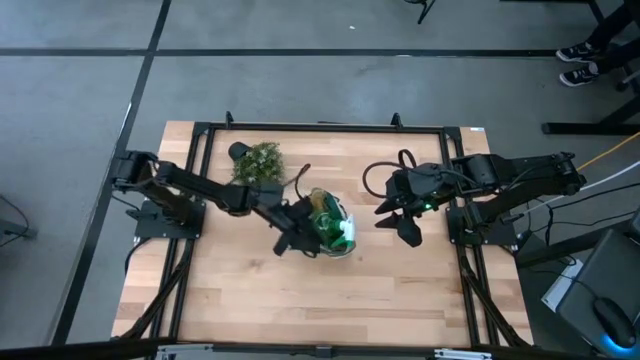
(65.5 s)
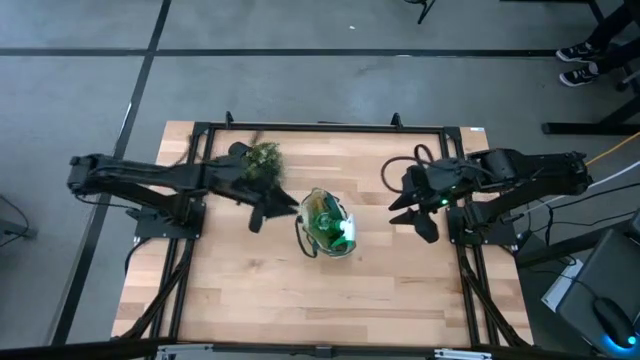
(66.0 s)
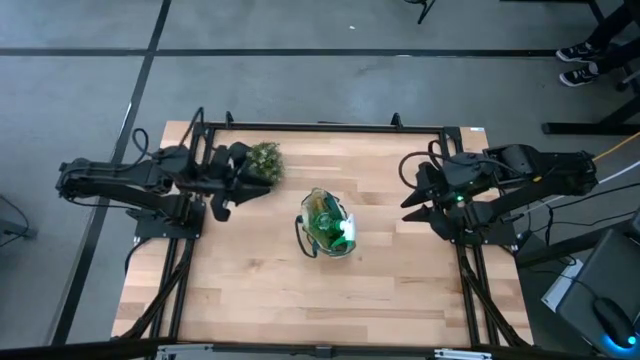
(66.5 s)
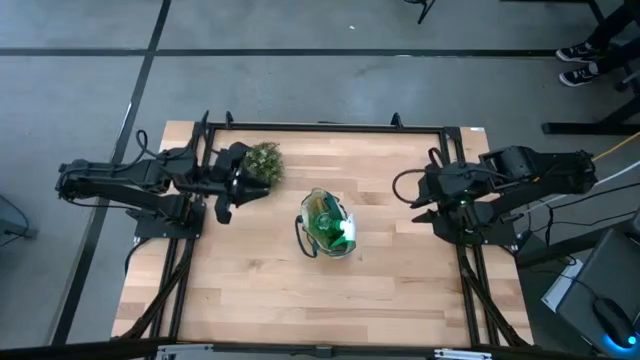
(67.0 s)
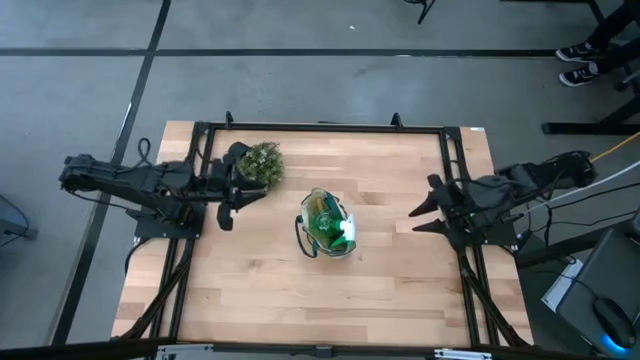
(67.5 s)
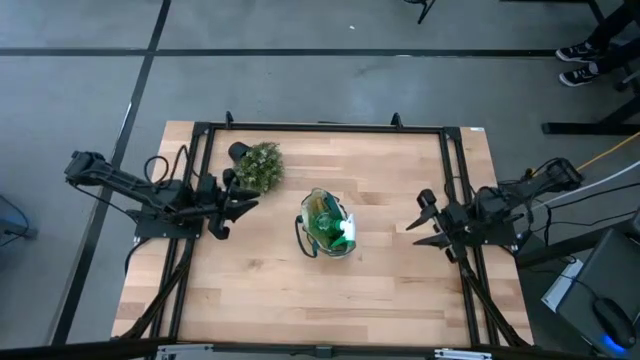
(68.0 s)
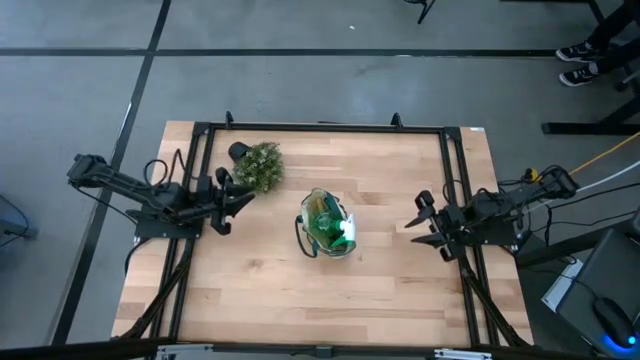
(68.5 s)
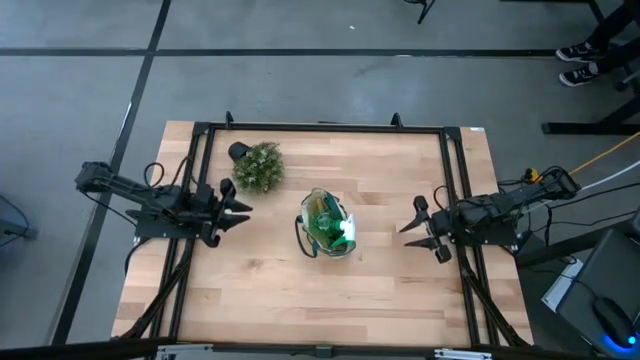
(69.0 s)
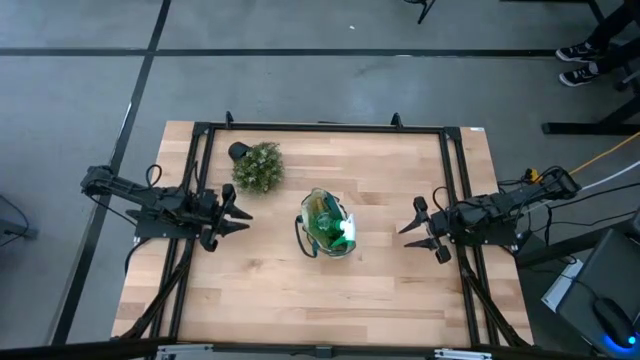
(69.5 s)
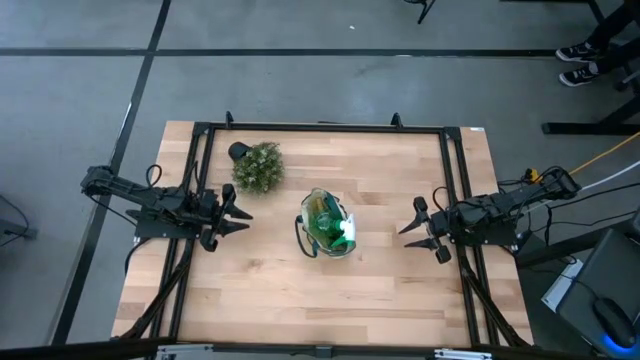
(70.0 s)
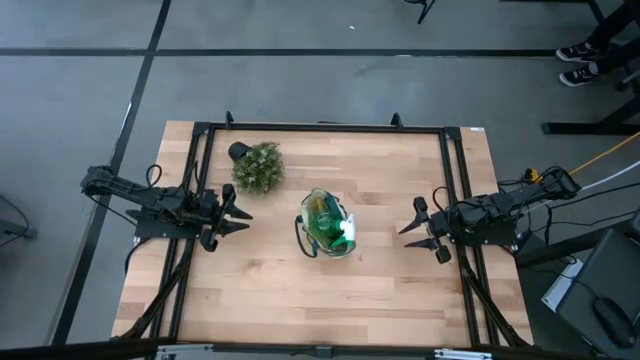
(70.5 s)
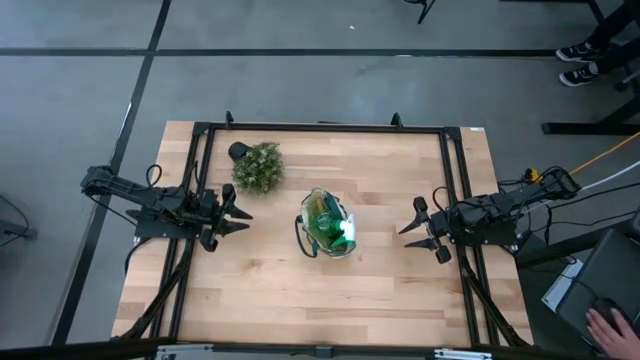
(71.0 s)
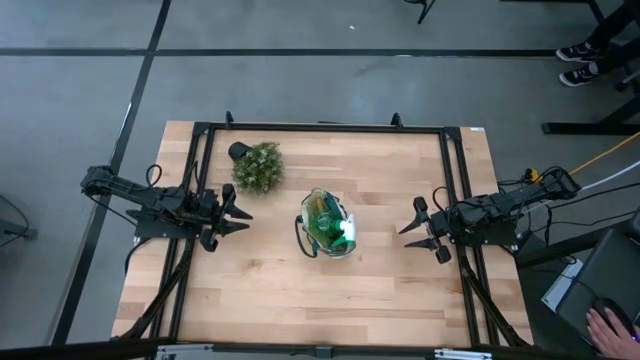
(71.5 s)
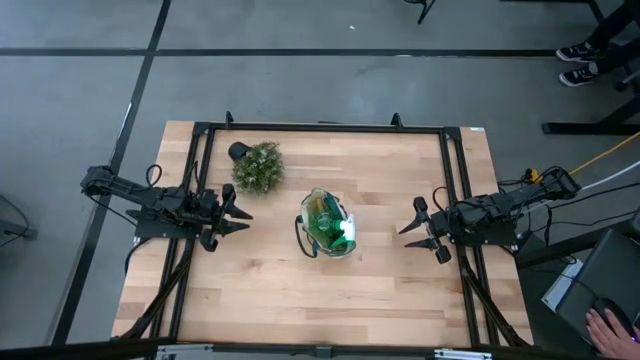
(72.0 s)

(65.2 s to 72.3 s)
Task: Pick & Place Garden tools in Gardening bag
Return to Home Position

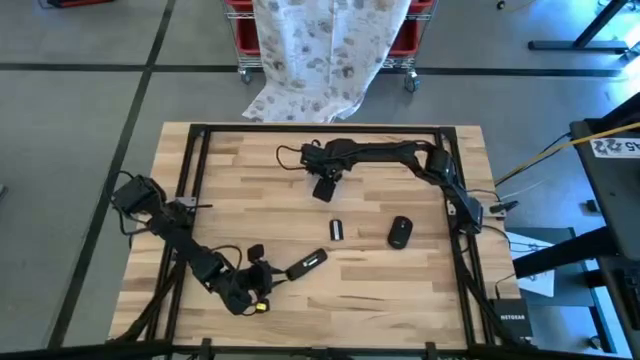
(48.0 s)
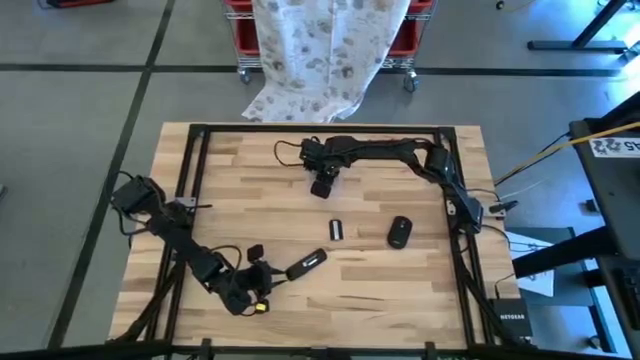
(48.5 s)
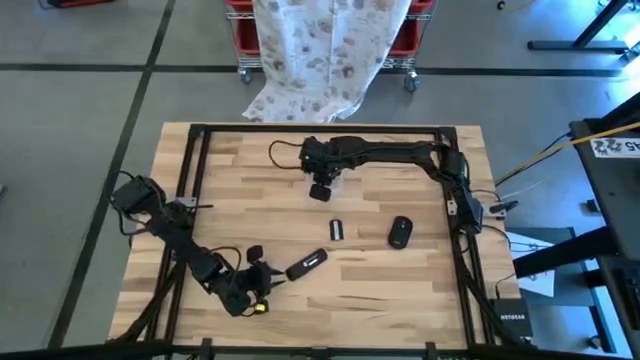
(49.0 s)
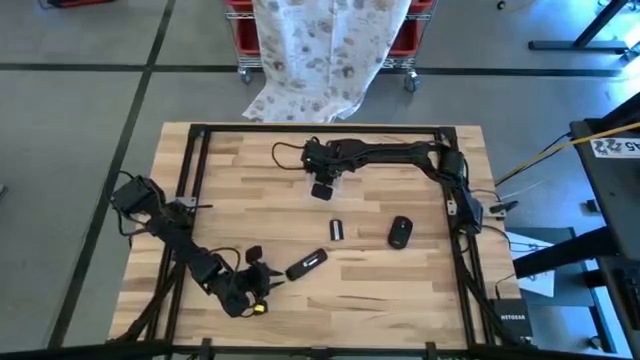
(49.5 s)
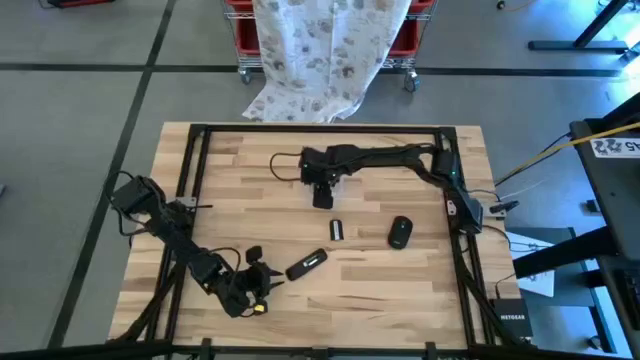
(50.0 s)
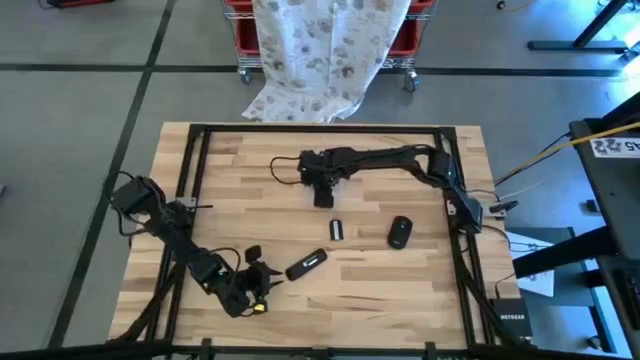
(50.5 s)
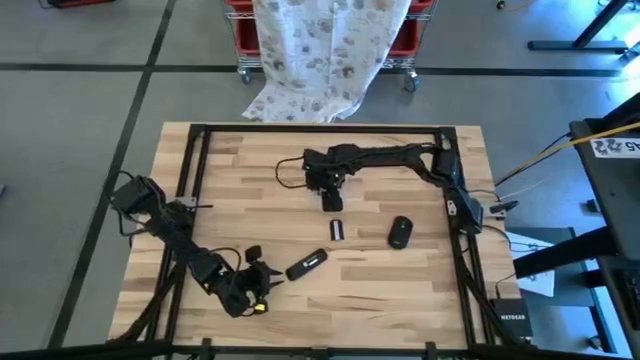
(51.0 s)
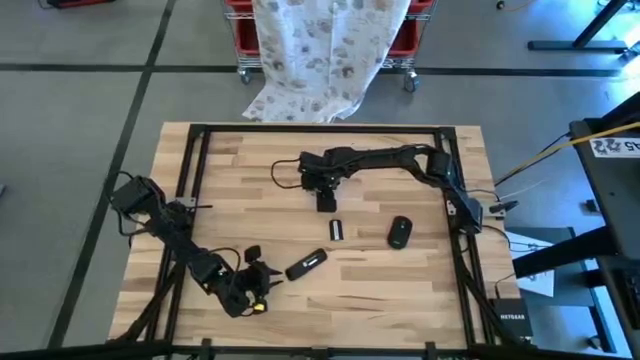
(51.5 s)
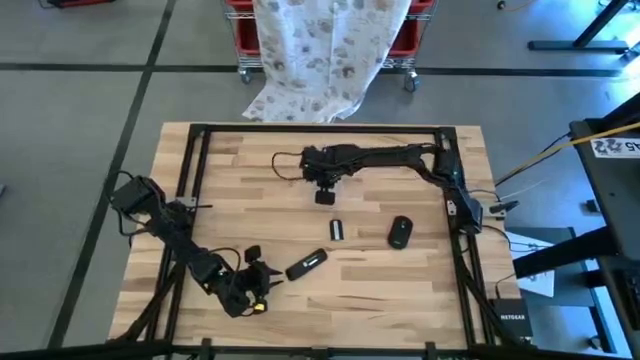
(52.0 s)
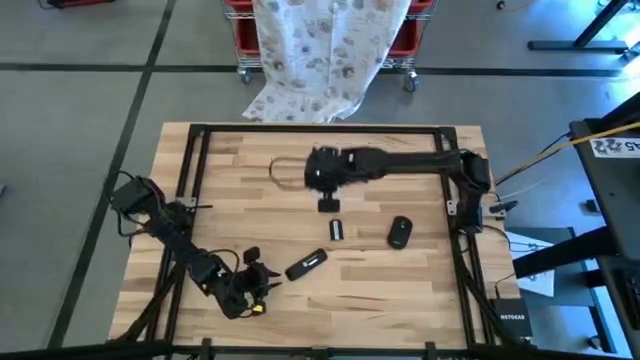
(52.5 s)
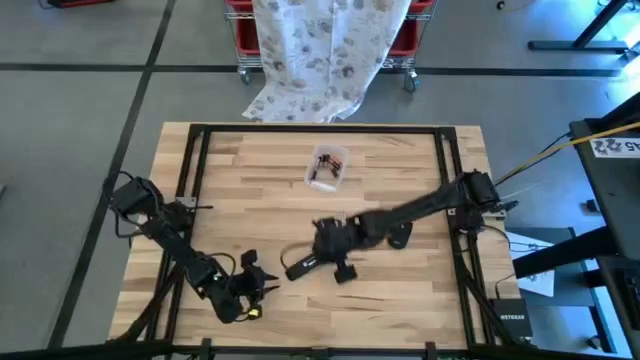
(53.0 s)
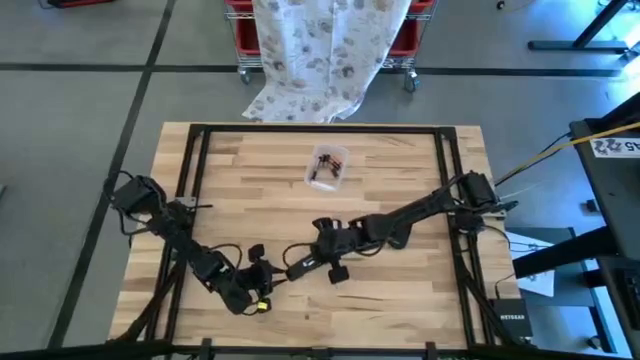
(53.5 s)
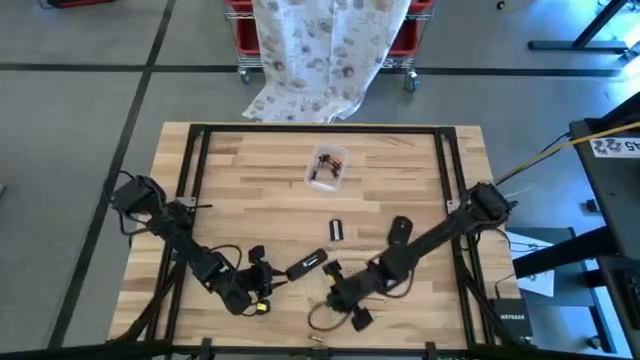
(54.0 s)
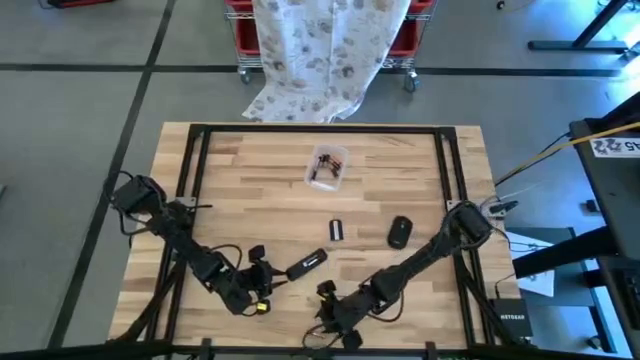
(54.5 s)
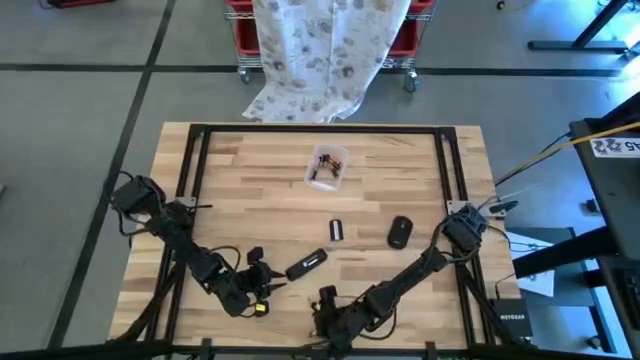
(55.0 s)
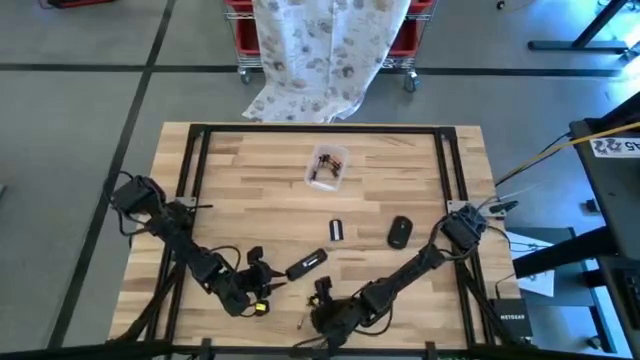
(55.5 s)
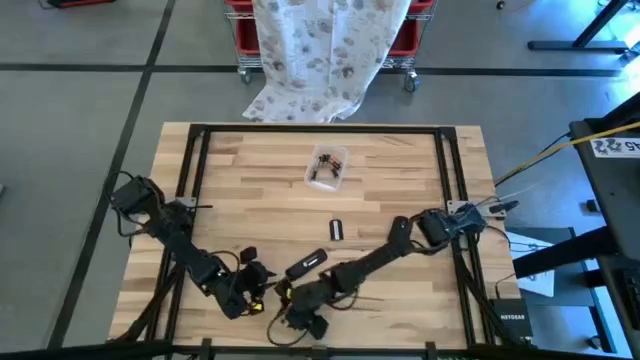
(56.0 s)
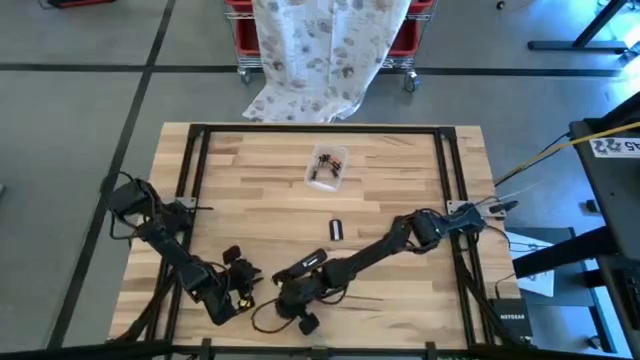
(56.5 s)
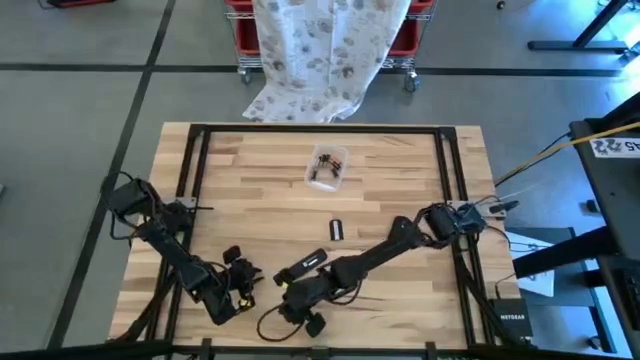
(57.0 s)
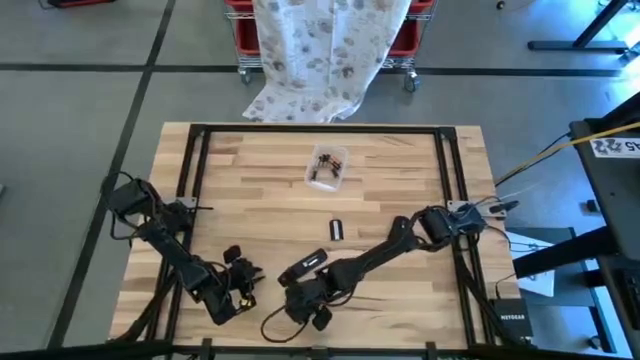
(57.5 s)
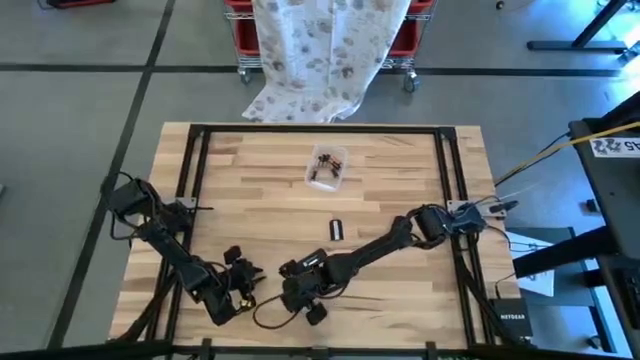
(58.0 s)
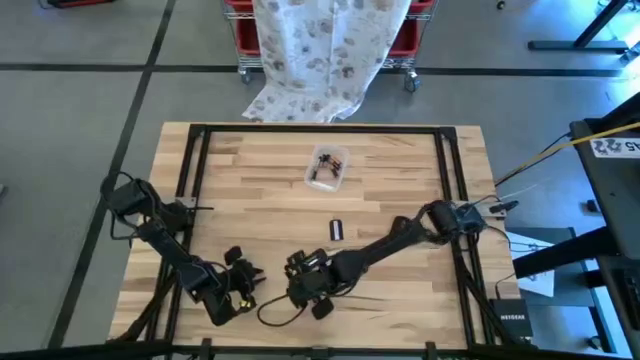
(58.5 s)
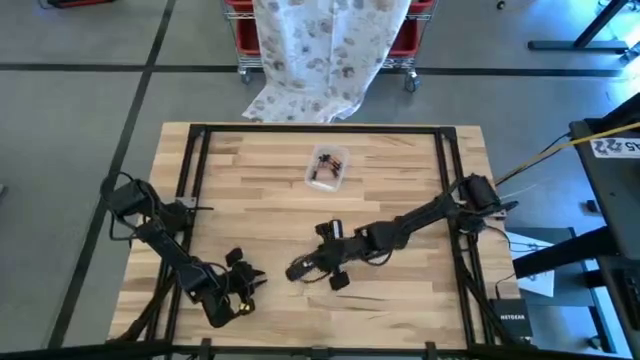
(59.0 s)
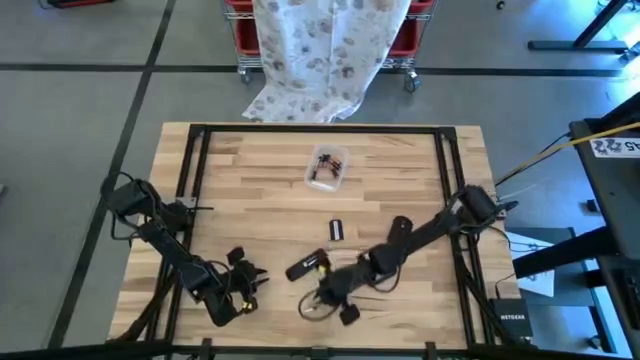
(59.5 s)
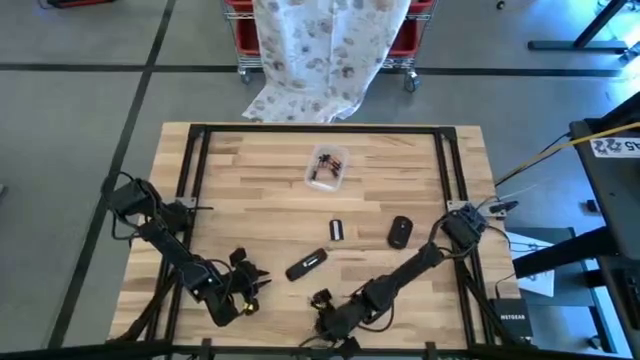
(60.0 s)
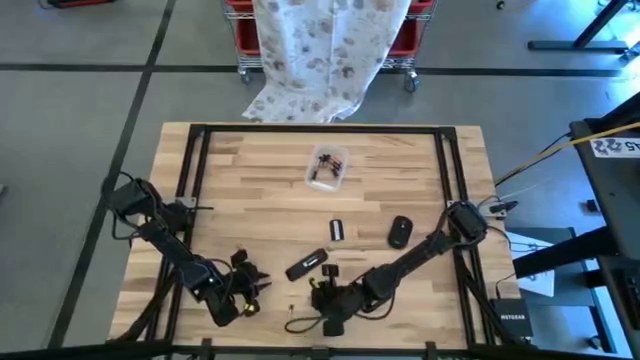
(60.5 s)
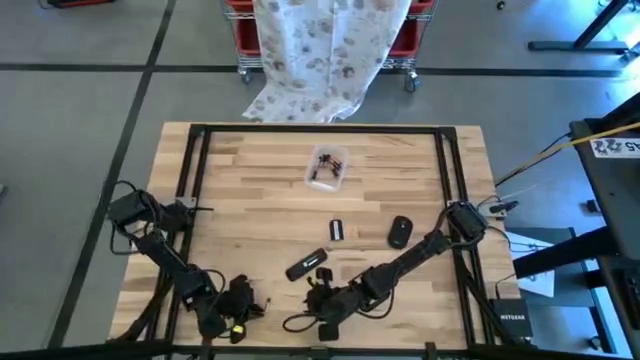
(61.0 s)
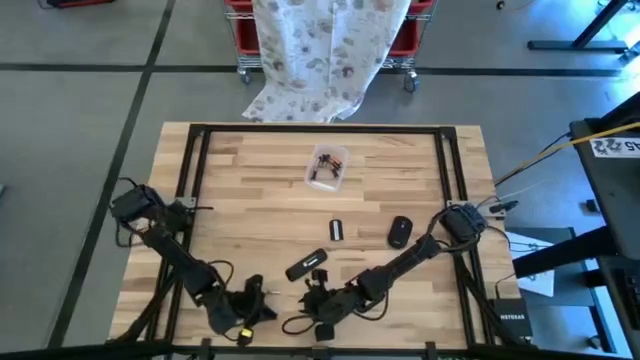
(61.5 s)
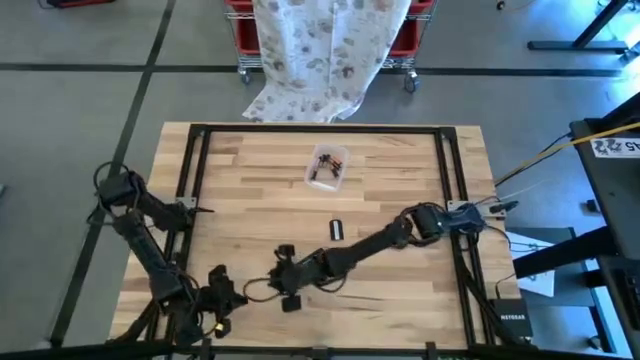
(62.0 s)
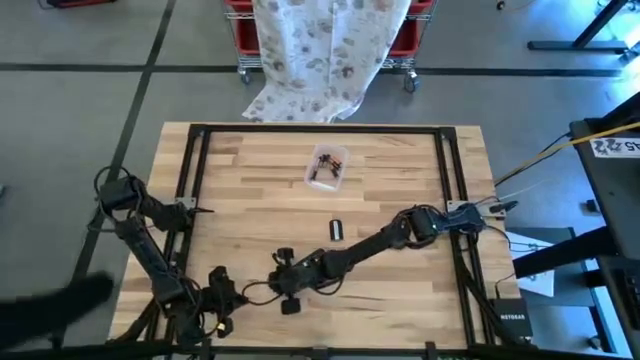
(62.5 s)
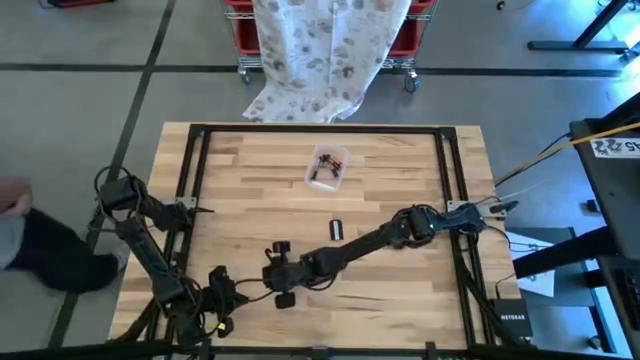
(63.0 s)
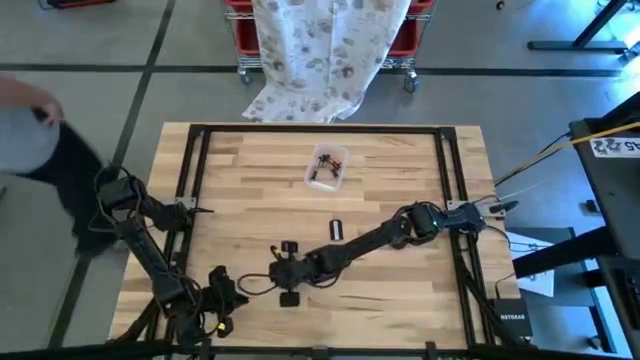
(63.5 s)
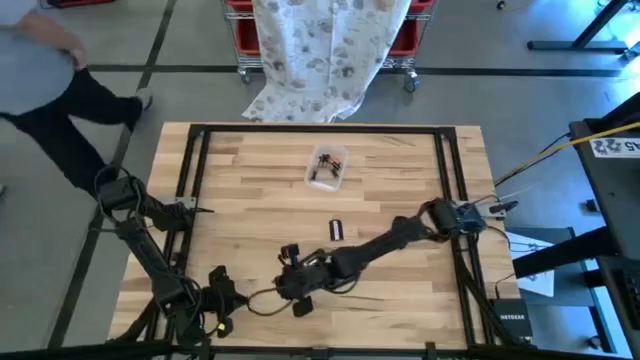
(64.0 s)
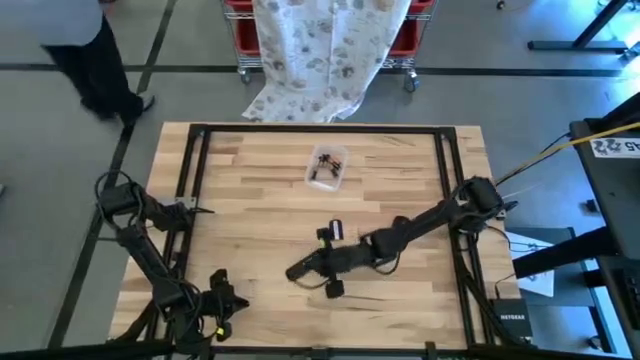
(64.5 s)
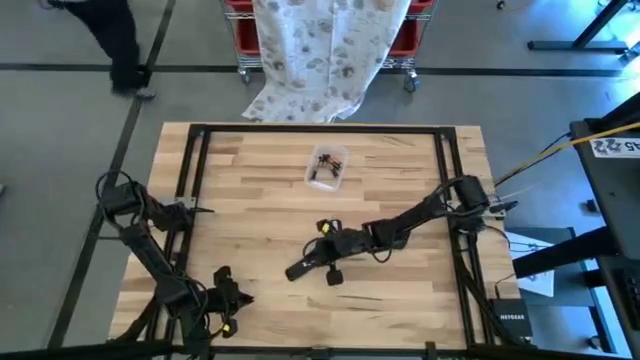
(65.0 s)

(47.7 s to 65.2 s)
Task: Insert battery
Insert the white battery into the remote control
